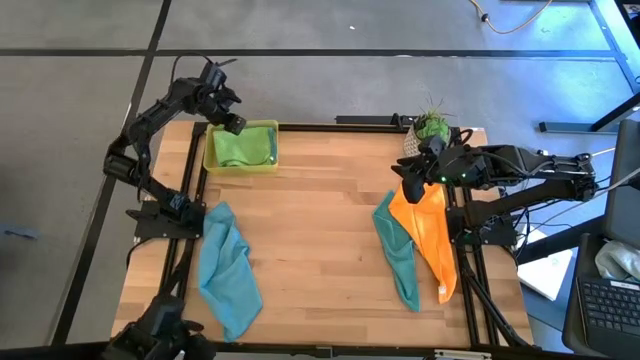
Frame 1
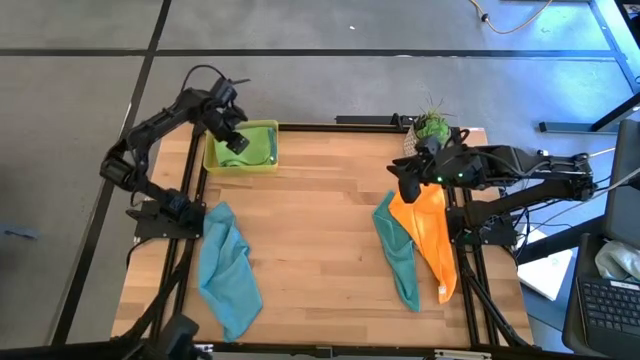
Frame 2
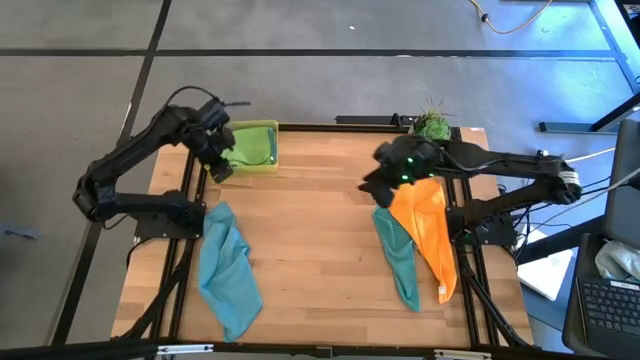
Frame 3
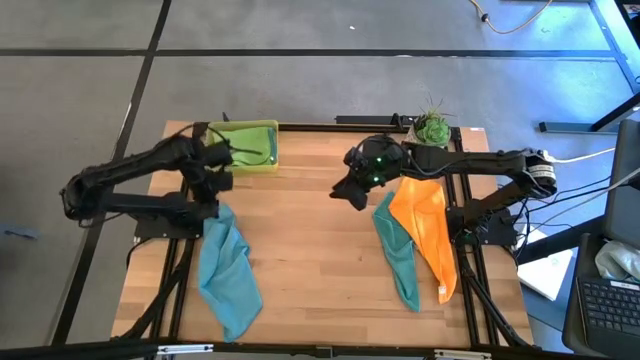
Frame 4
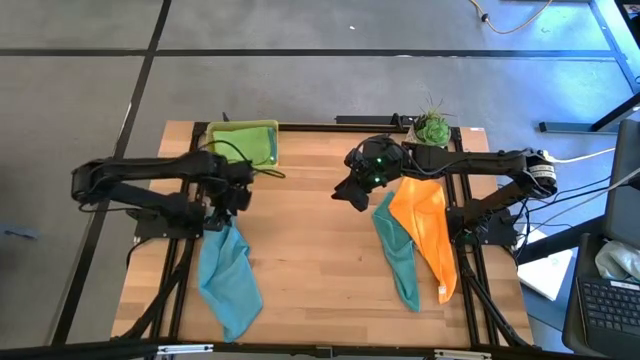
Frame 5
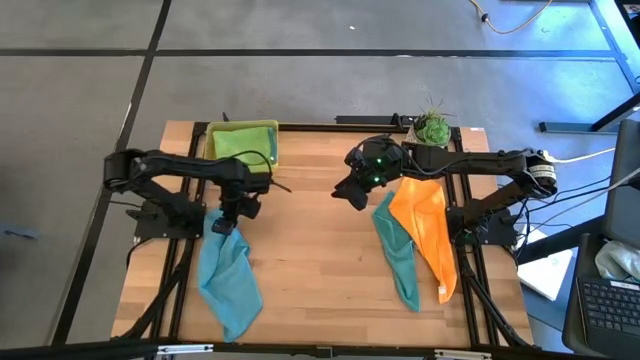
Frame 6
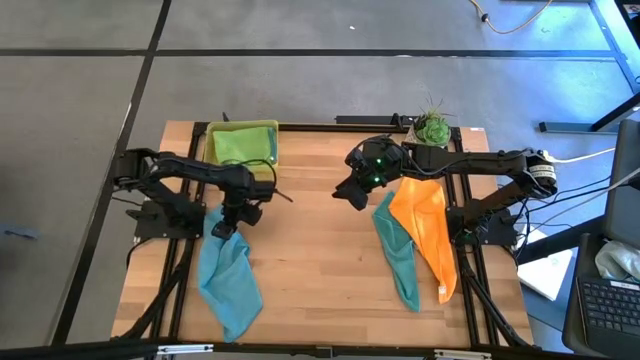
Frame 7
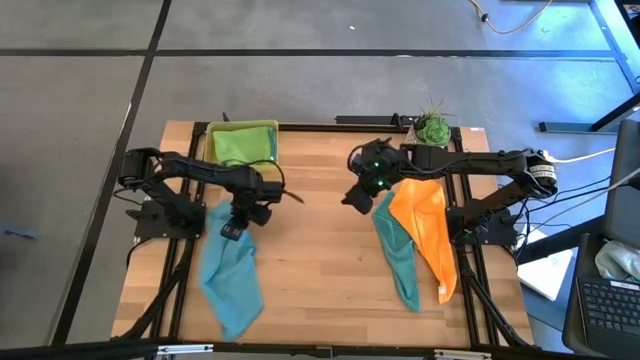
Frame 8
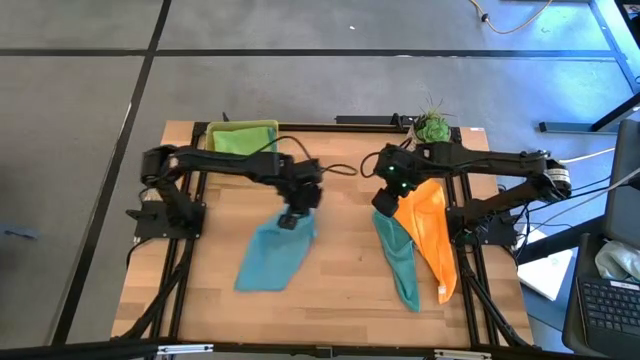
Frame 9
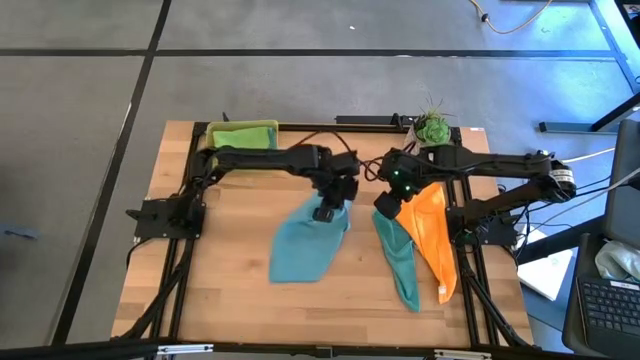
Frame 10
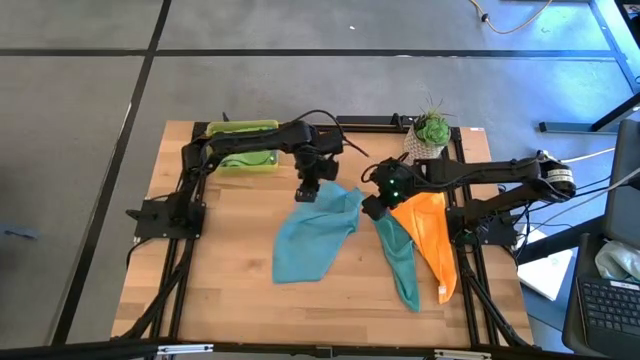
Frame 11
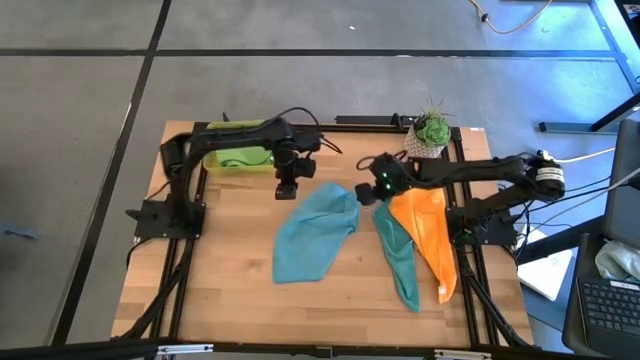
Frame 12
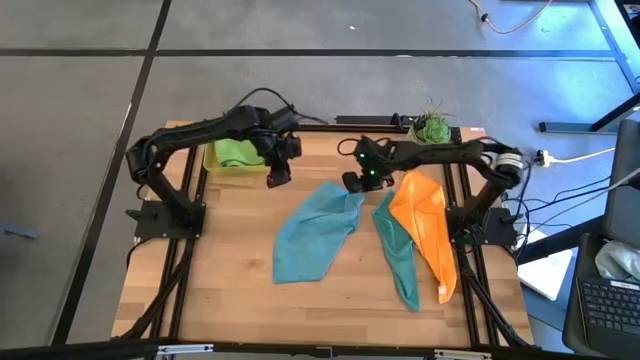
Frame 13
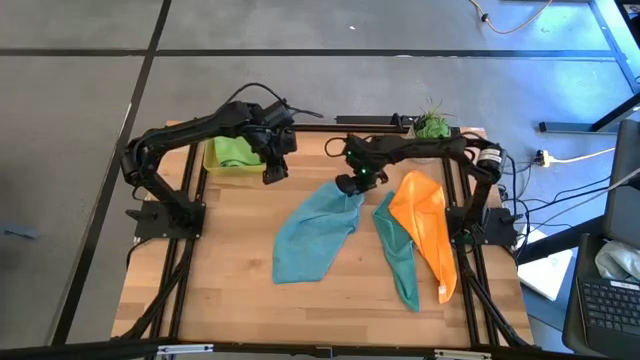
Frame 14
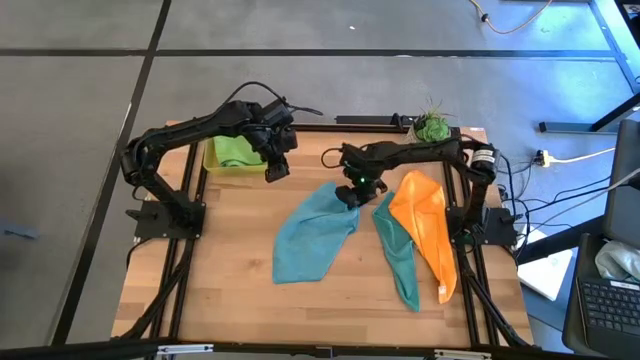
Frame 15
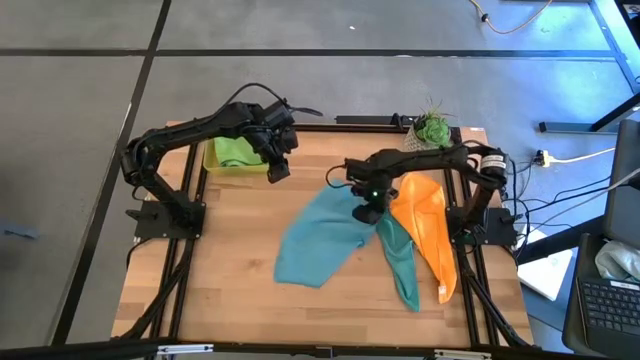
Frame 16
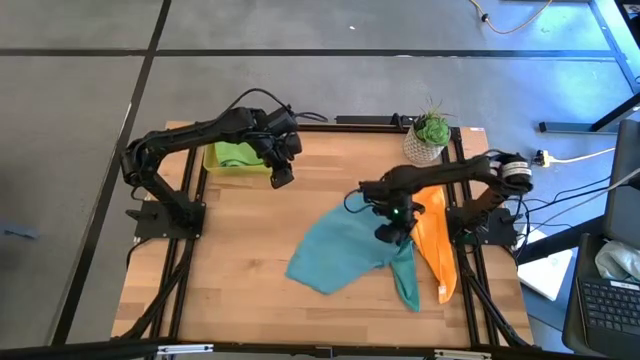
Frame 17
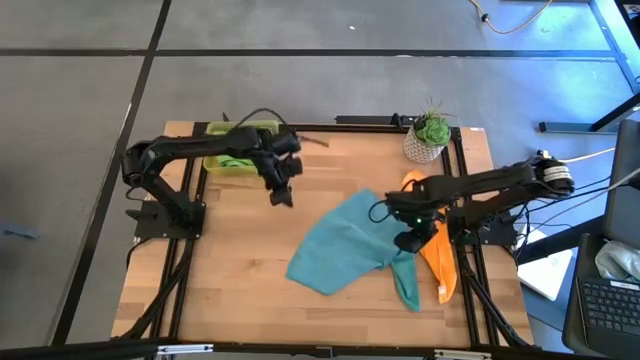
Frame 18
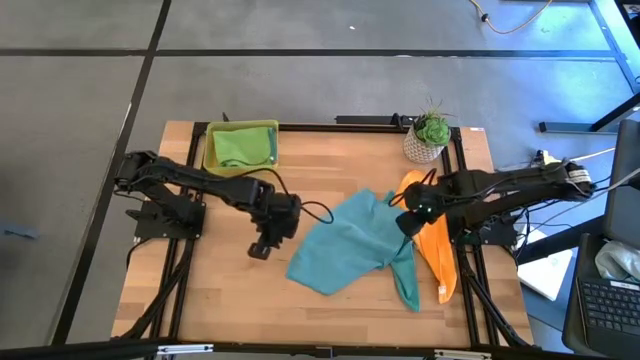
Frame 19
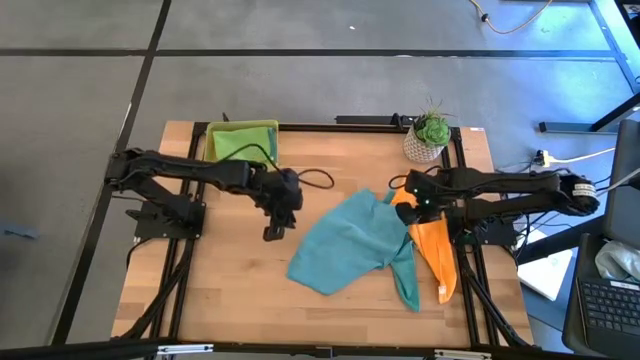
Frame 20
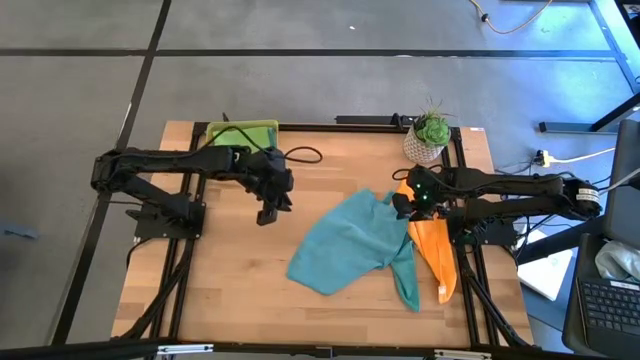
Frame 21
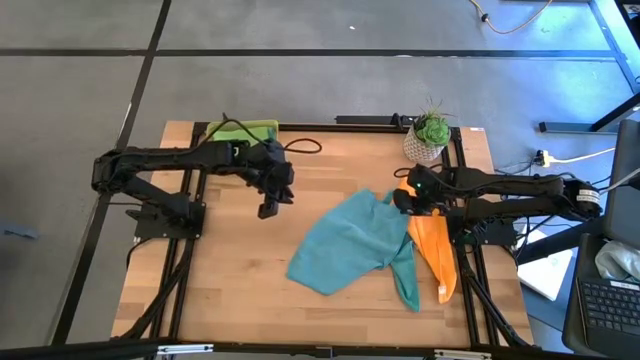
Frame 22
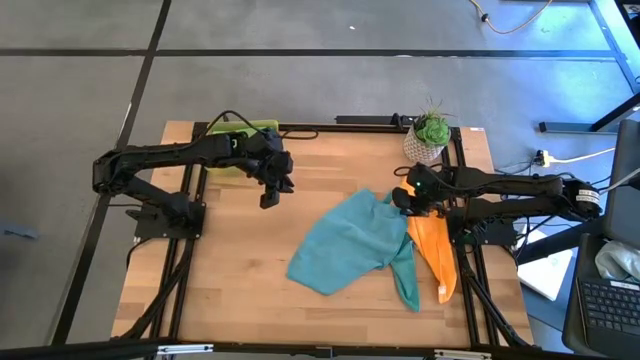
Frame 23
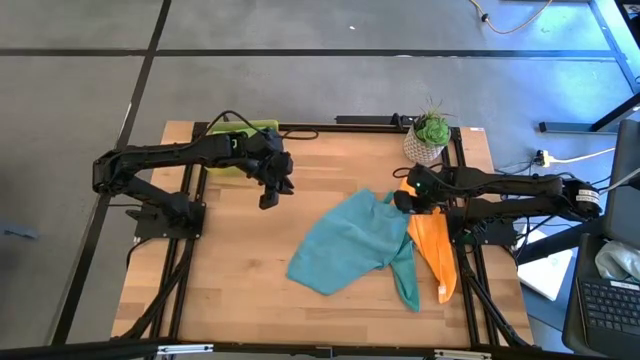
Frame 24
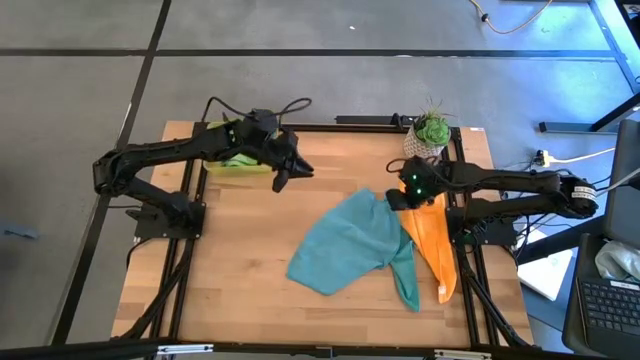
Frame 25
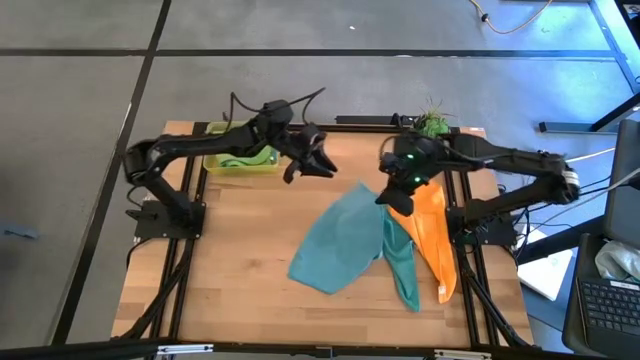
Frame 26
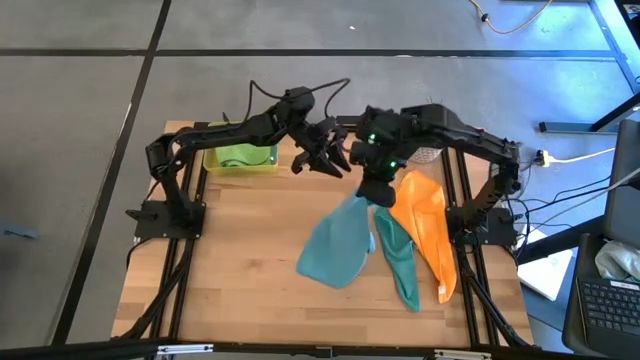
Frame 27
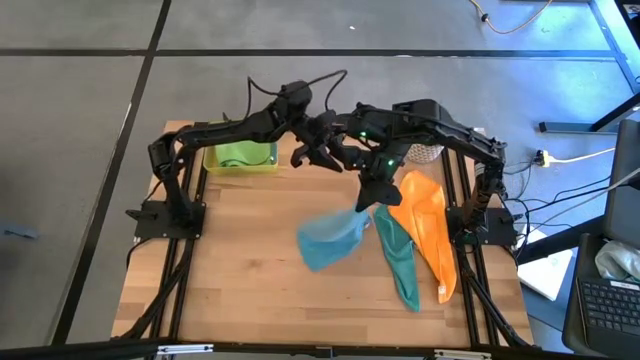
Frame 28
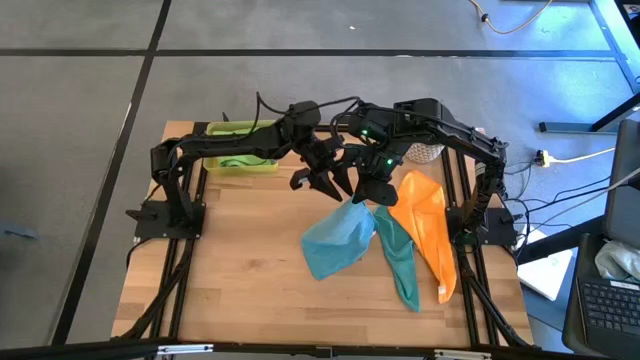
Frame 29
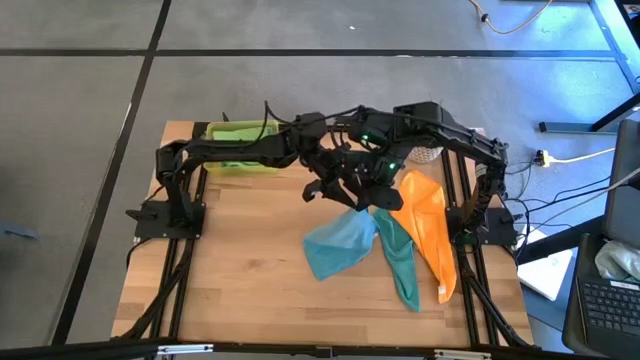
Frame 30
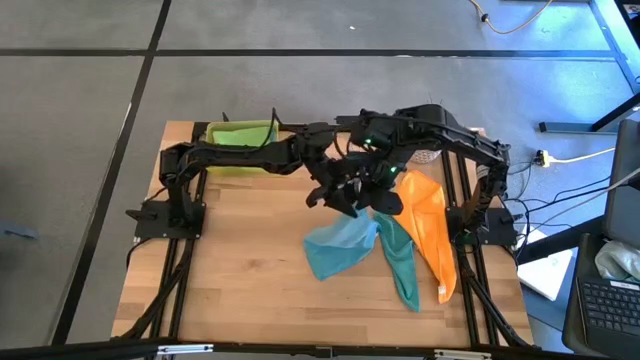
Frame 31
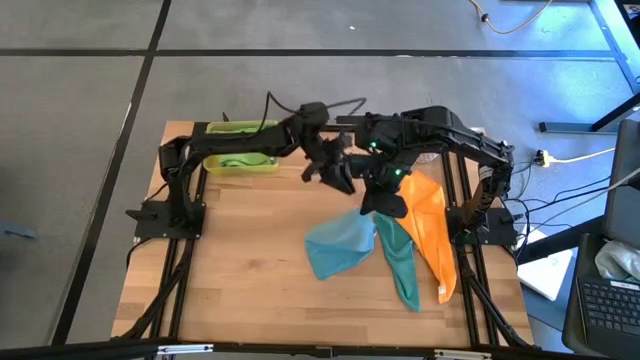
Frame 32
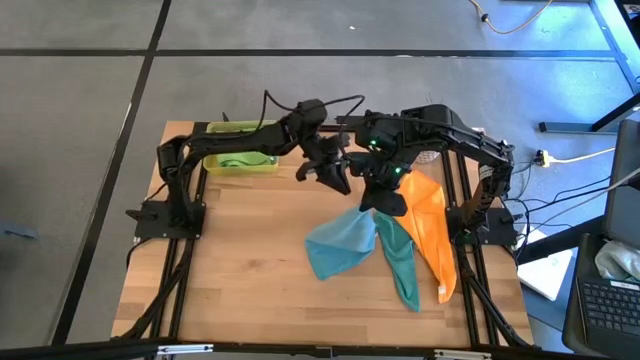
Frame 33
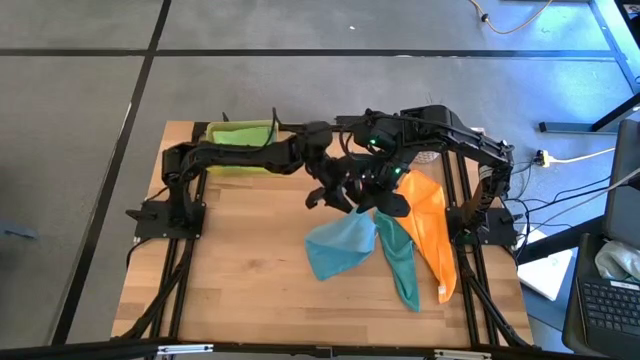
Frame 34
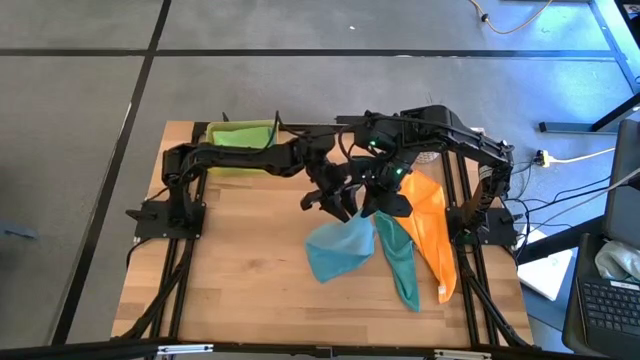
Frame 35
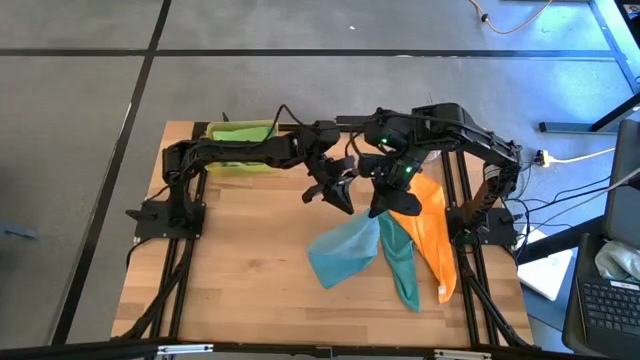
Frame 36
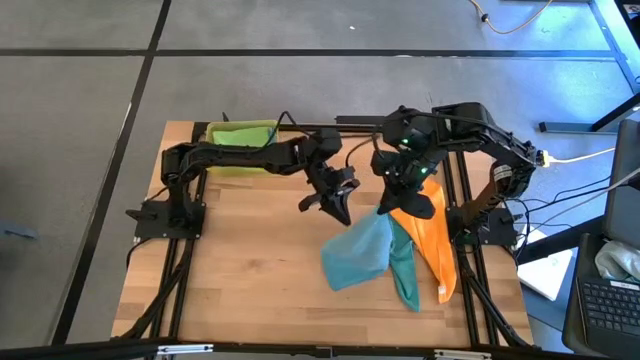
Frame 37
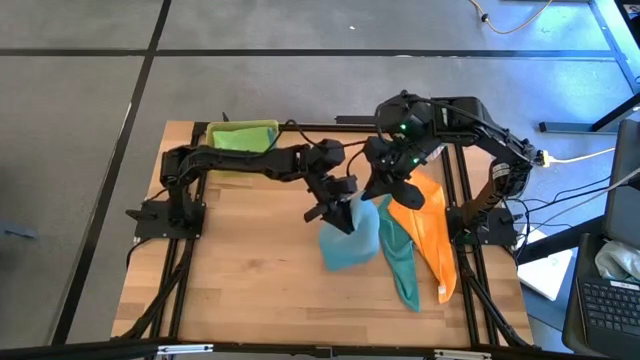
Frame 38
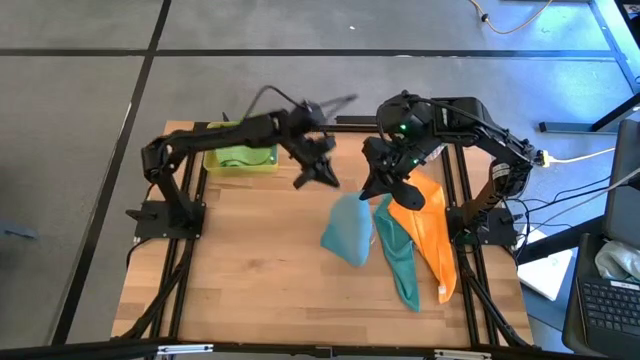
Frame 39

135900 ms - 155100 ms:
Task: Fold microfiber towels
Fold the left blue towel
